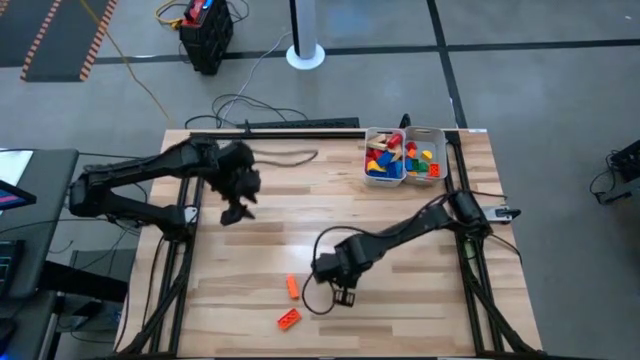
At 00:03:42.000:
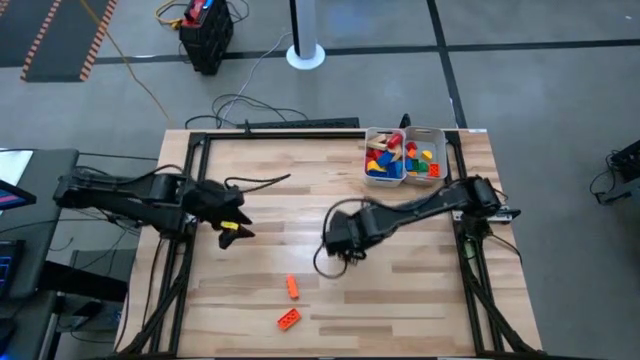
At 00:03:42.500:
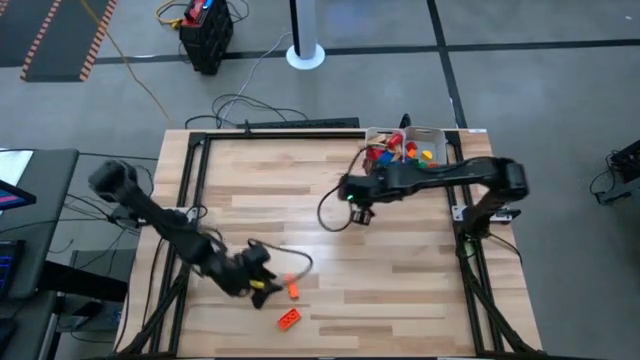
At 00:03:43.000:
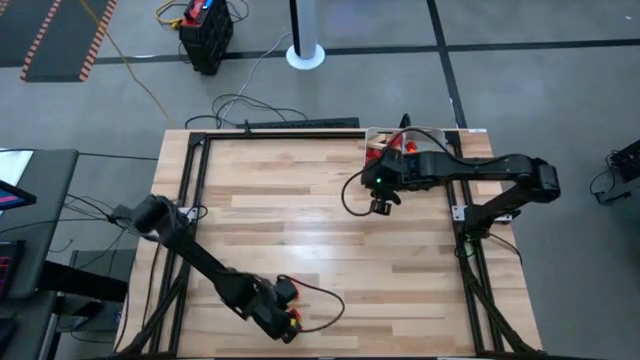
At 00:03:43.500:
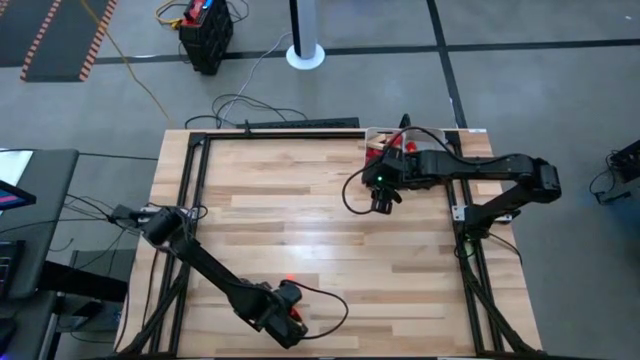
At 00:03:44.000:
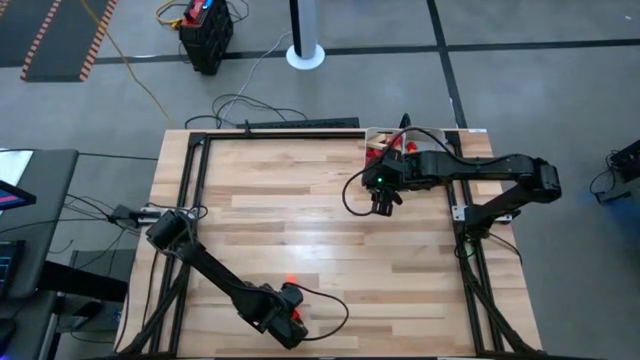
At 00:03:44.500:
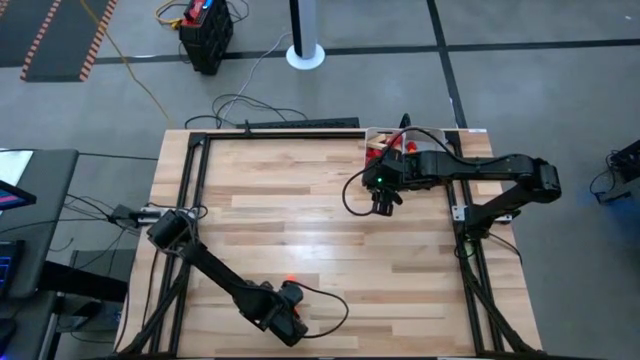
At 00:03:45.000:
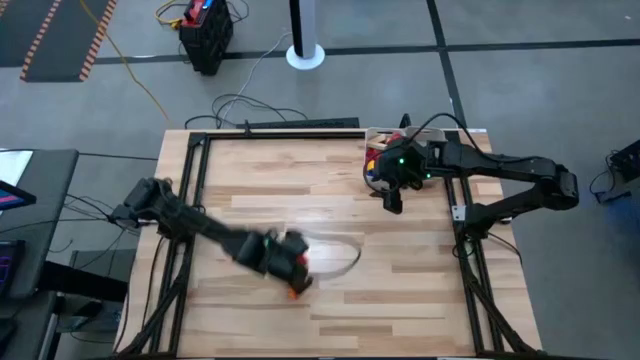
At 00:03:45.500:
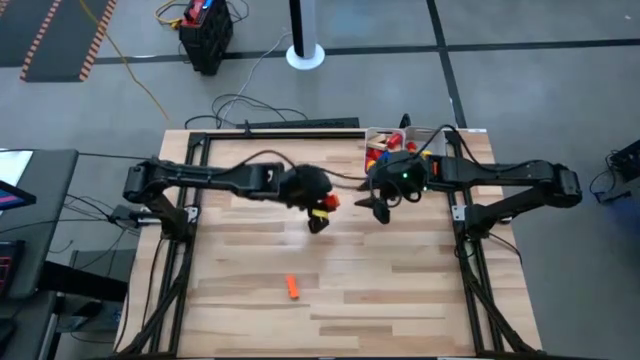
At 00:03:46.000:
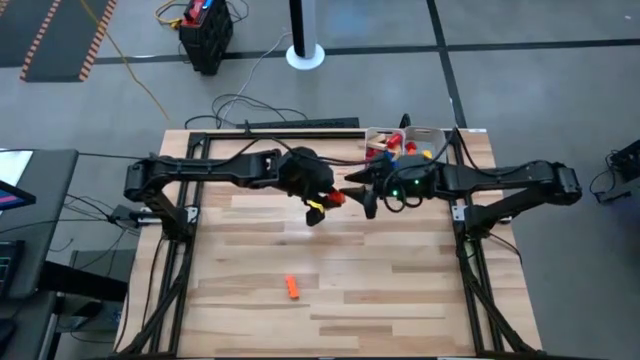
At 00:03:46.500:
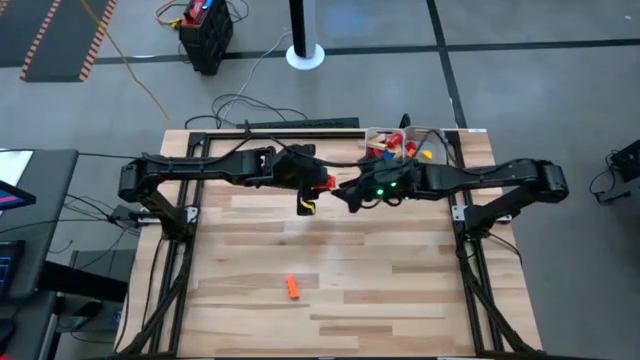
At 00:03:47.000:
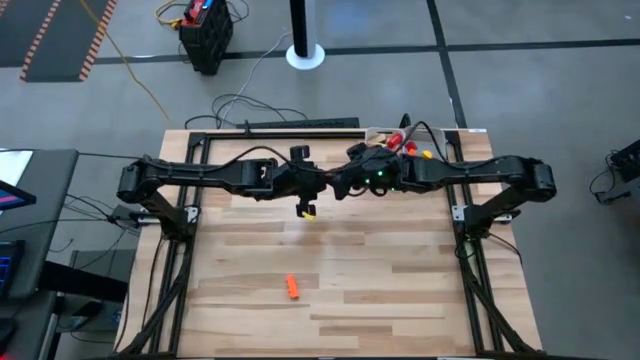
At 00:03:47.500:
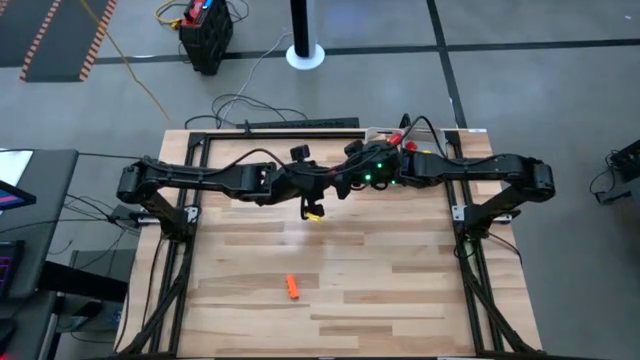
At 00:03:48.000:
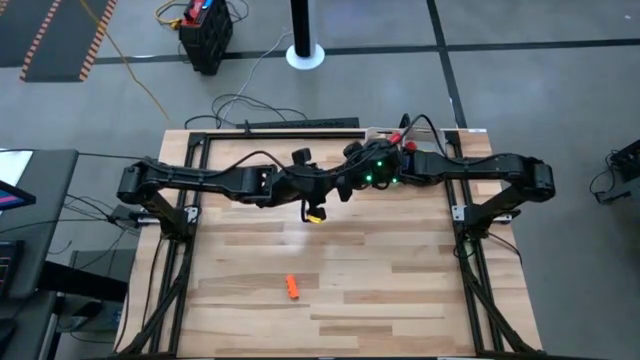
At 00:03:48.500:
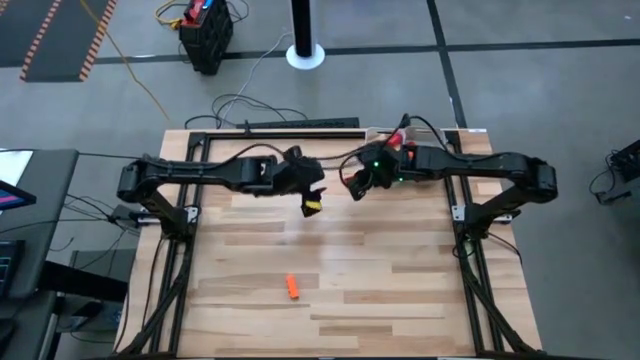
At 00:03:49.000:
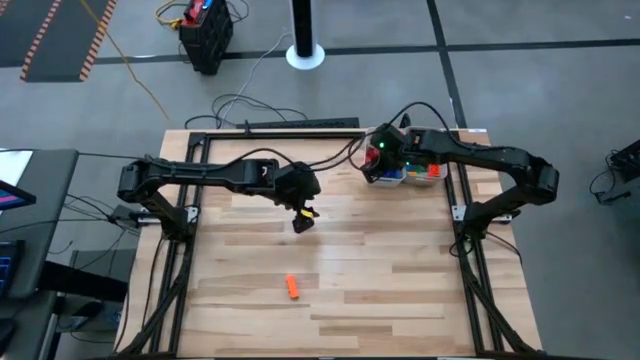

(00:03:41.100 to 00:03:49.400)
Task: Sort blocks by size
Put the large orange game piece into the white bin

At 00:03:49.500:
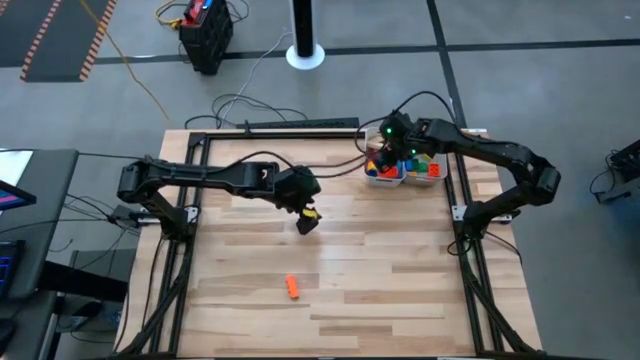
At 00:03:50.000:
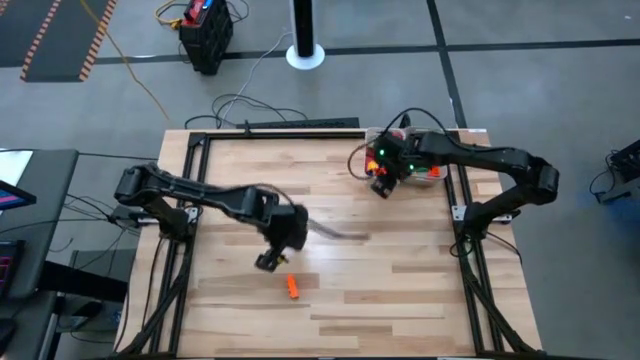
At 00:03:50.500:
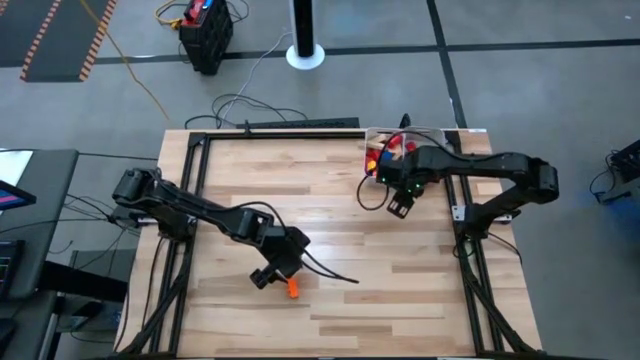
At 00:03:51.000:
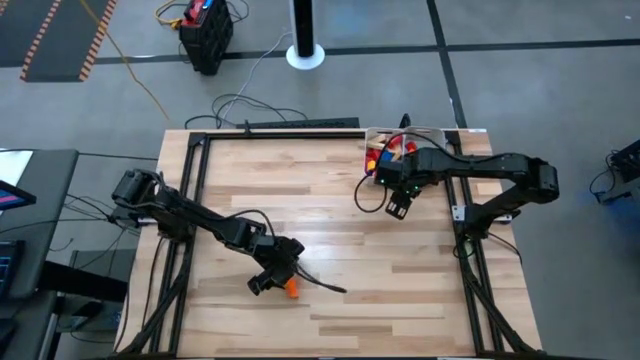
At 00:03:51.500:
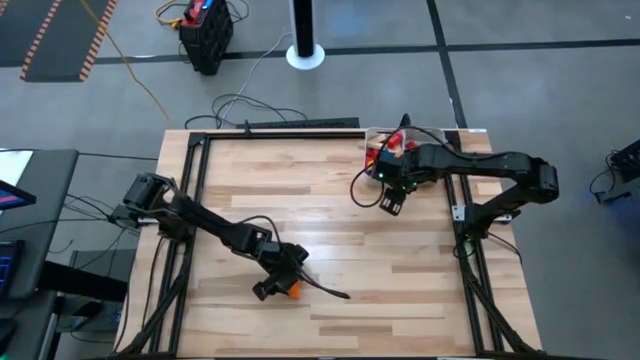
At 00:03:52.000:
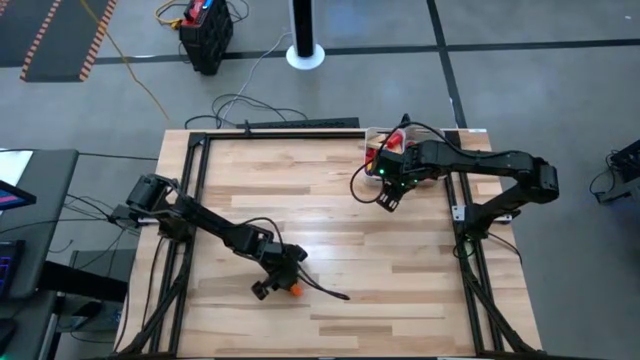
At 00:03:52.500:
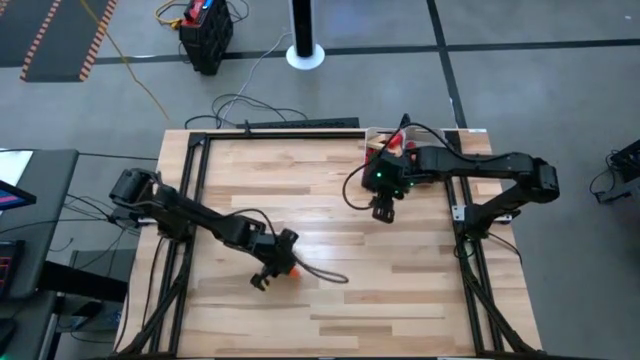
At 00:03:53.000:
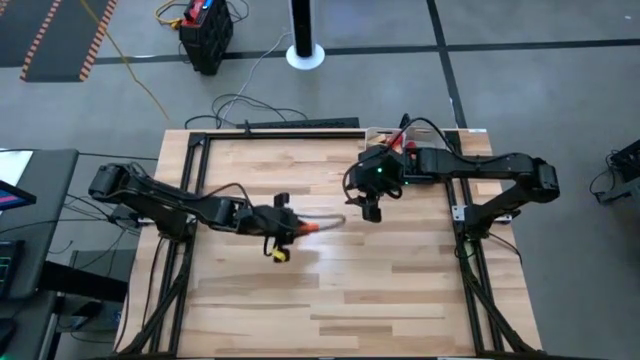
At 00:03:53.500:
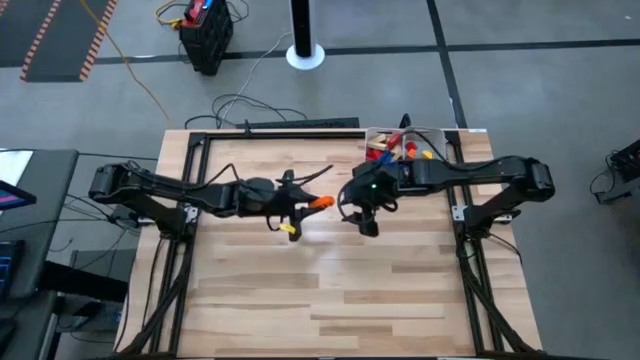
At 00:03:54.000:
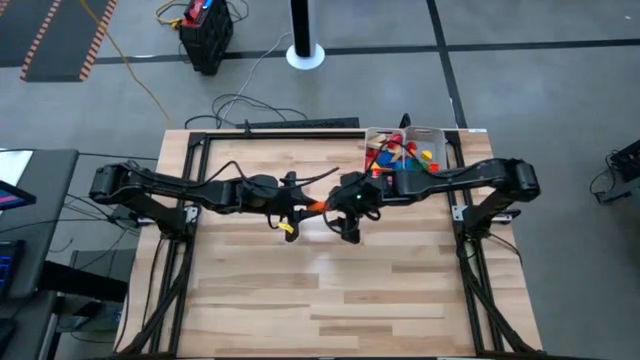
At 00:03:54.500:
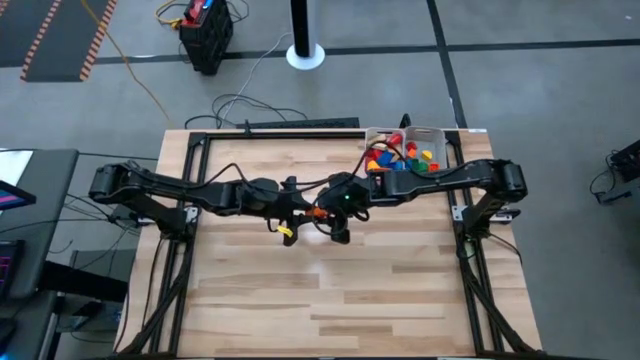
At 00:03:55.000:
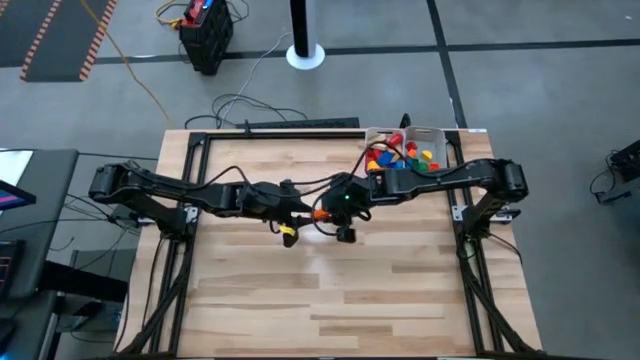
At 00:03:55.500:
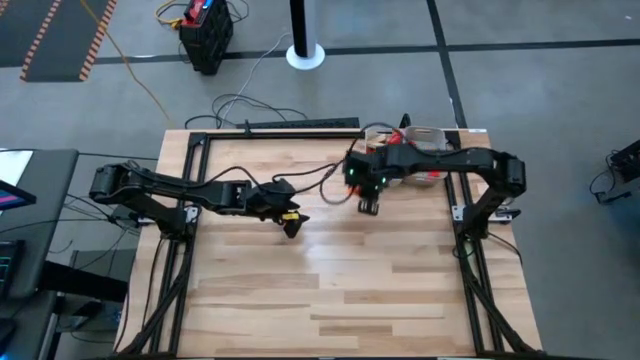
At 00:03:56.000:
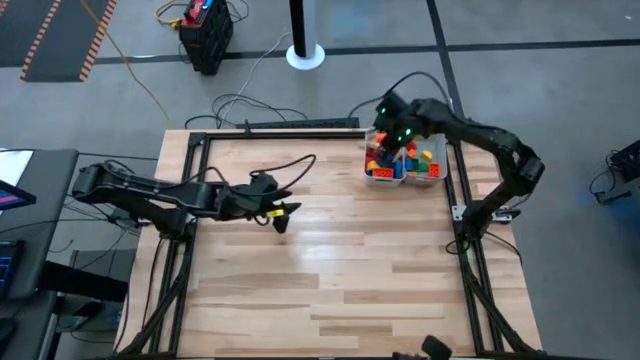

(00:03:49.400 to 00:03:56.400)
Put the large orange game piece into the white bin

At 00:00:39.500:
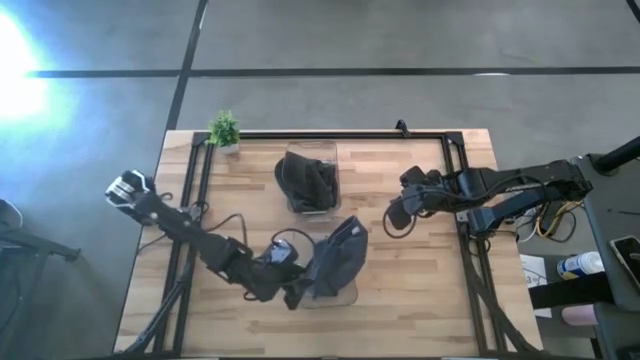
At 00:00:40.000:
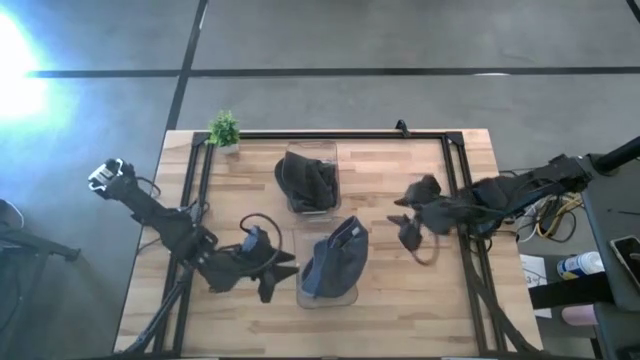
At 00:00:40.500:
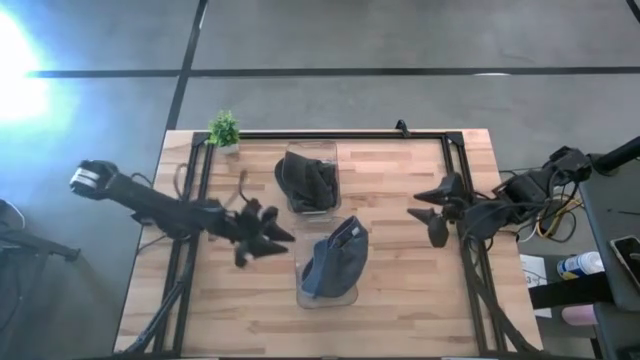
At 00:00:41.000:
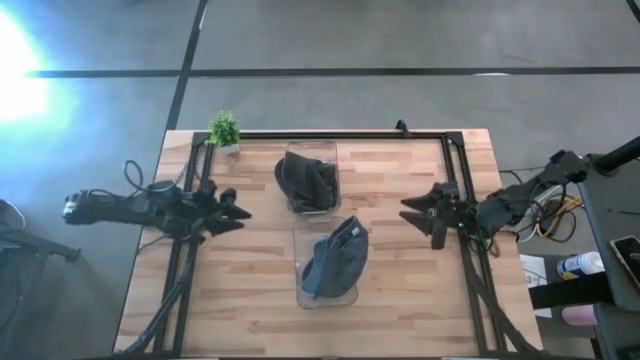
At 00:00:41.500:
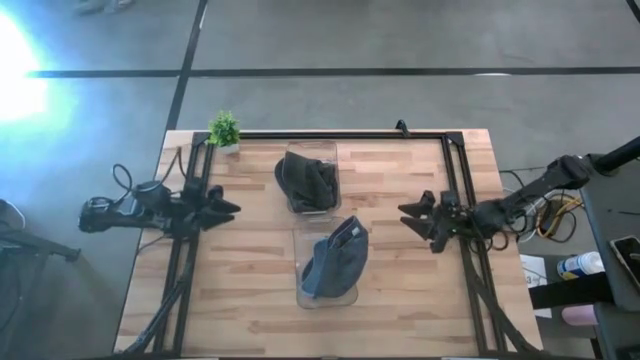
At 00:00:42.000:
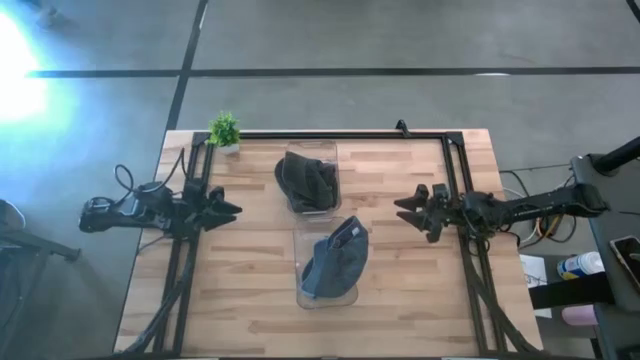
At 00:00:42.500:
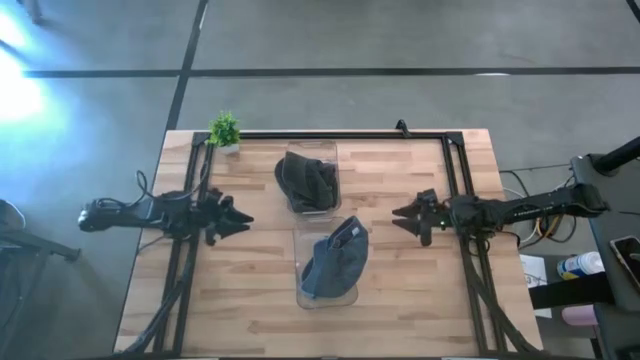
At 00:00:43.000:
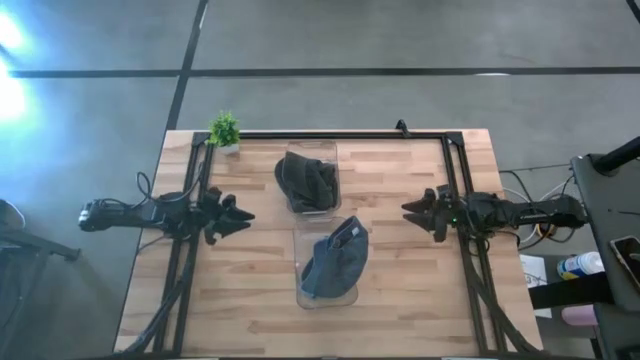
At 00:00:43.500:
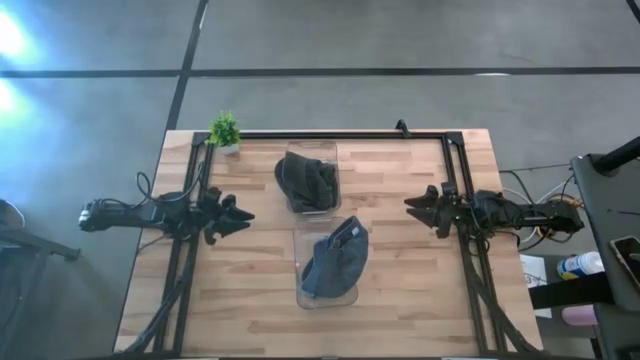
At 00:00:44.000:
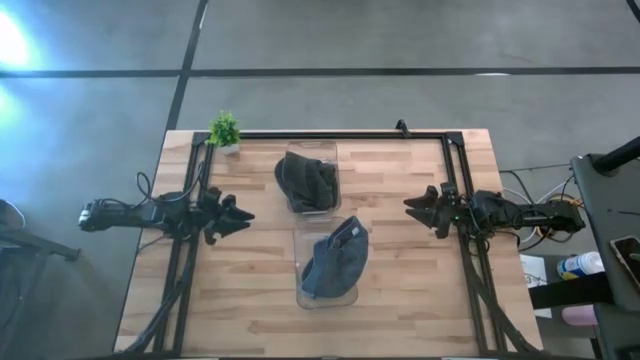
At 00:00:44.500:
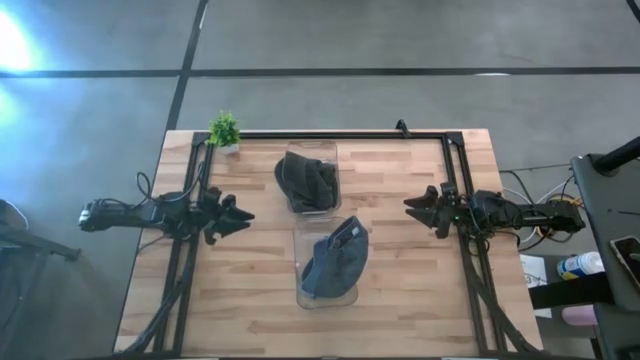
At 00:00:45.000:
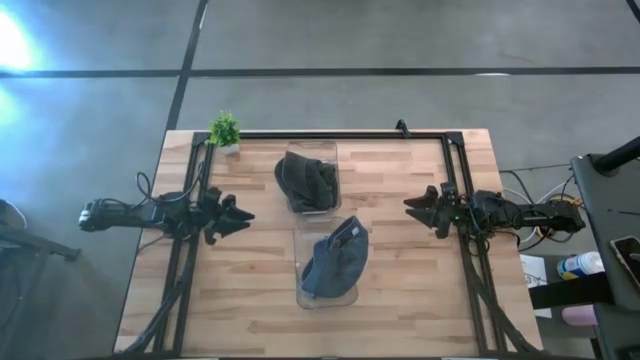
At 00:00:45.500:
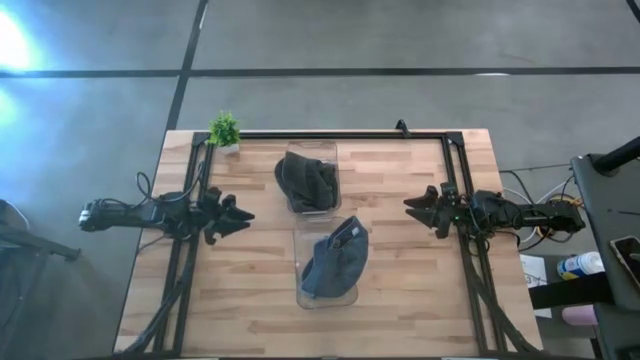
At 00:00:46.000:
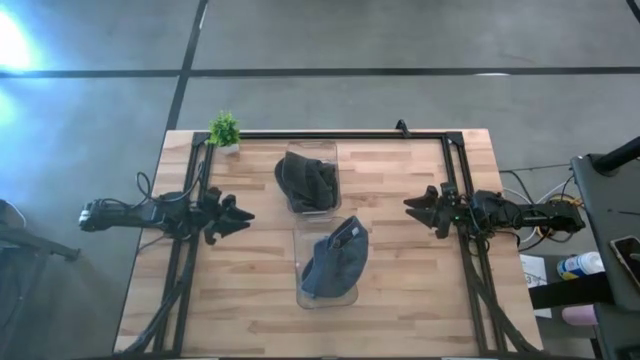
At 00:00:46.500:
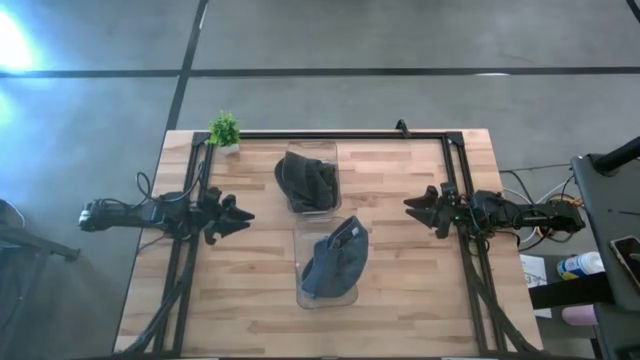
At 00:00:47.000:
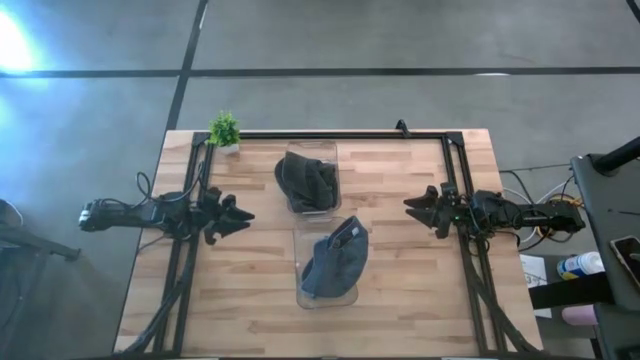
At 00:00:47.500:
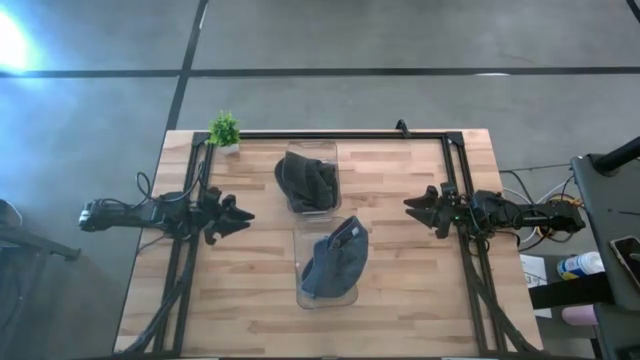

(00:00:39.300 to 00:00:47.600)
Task: Pick & Place hat
Return to Home Position
